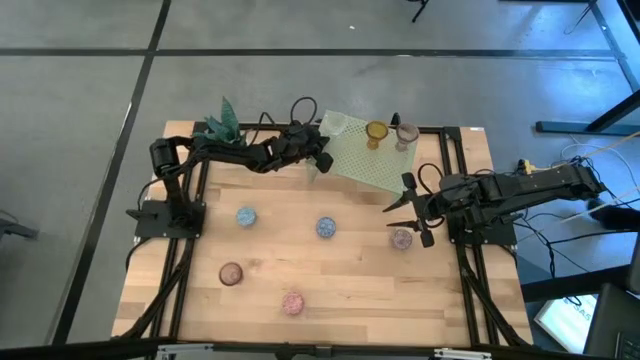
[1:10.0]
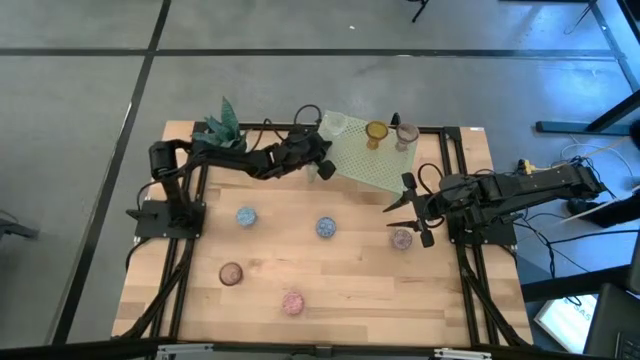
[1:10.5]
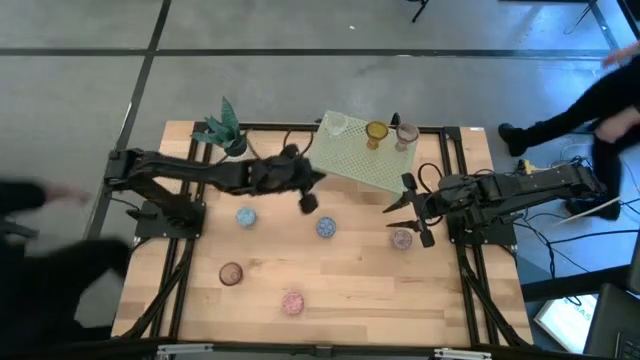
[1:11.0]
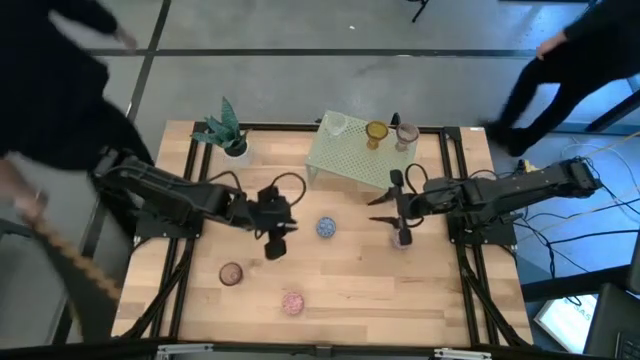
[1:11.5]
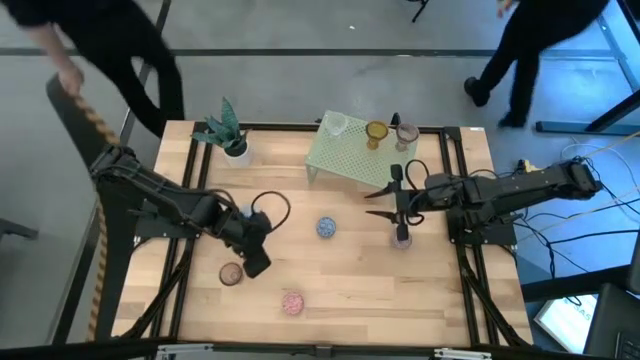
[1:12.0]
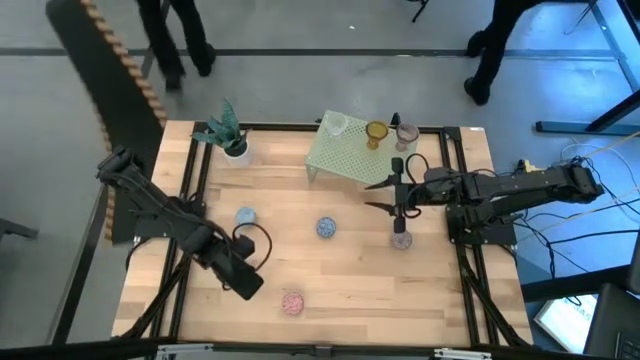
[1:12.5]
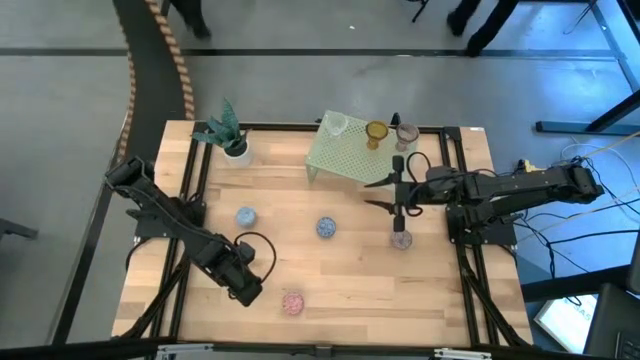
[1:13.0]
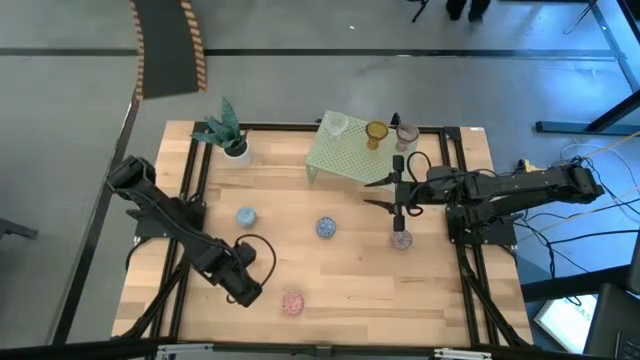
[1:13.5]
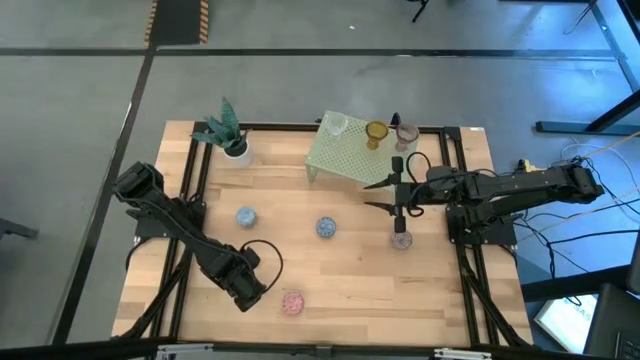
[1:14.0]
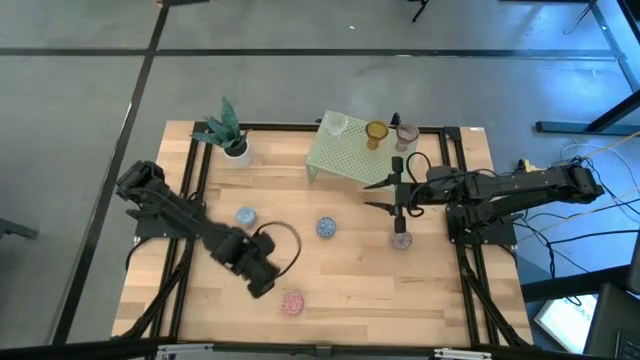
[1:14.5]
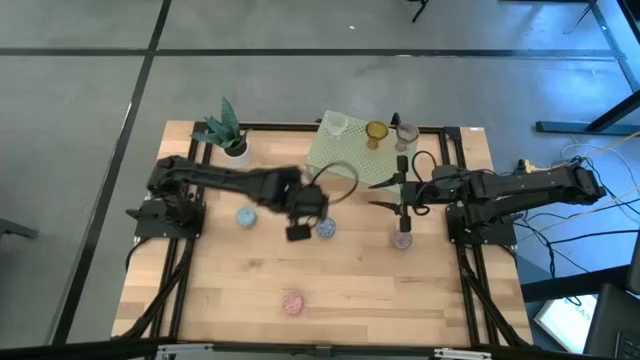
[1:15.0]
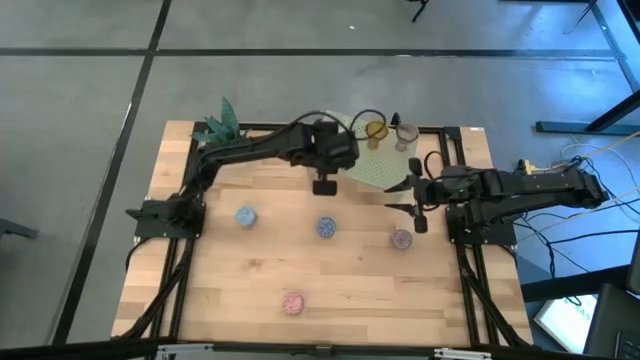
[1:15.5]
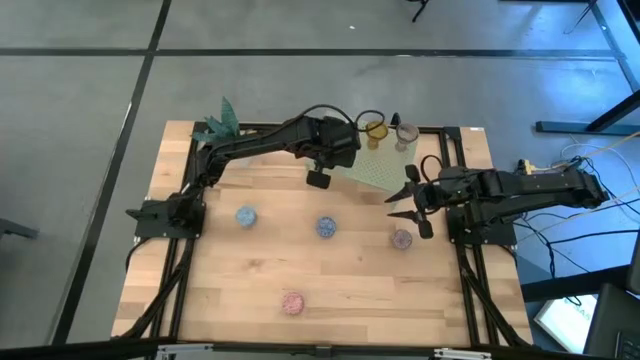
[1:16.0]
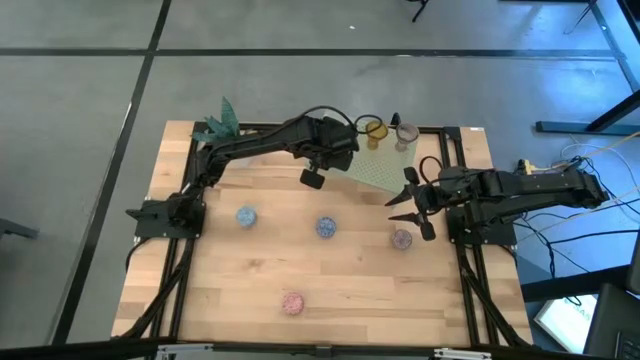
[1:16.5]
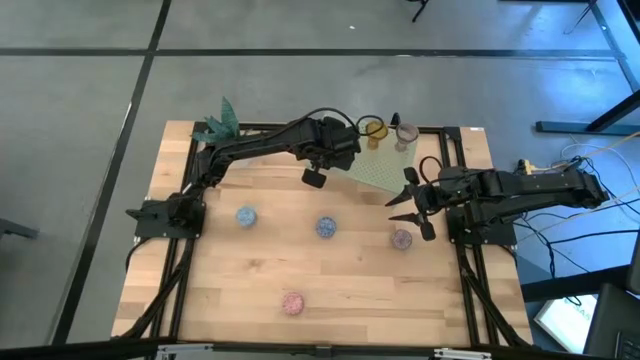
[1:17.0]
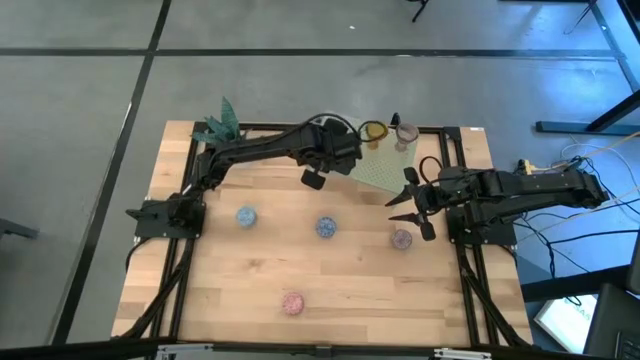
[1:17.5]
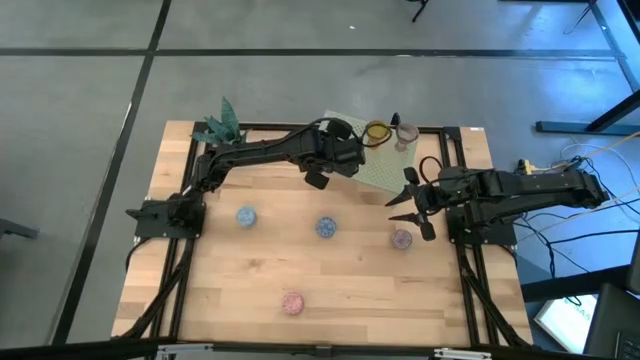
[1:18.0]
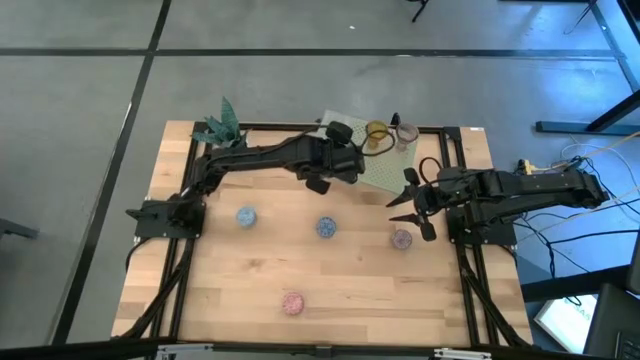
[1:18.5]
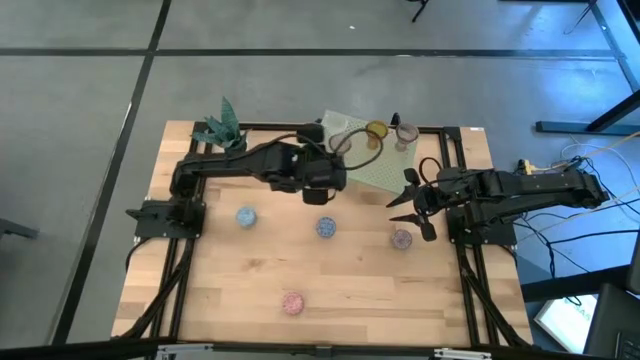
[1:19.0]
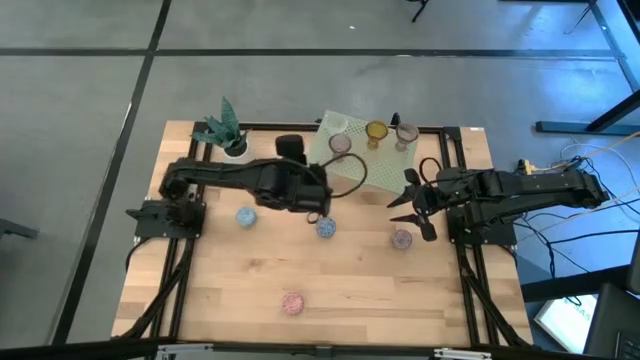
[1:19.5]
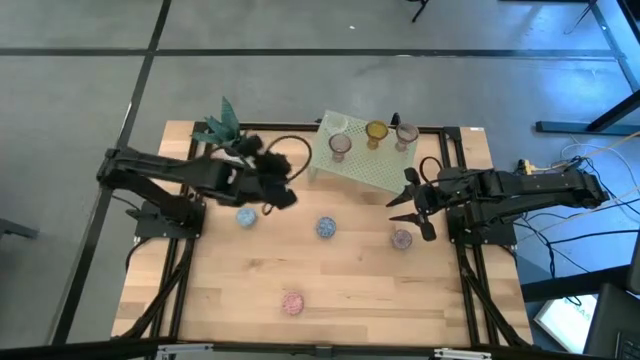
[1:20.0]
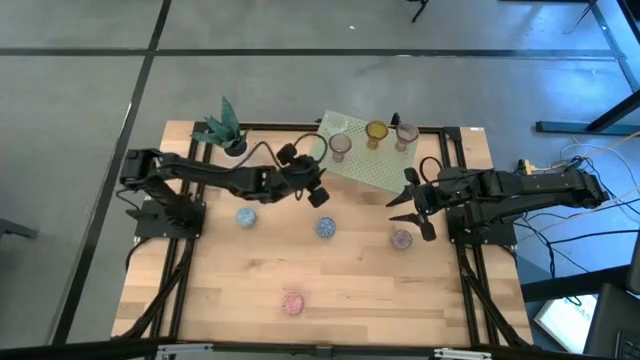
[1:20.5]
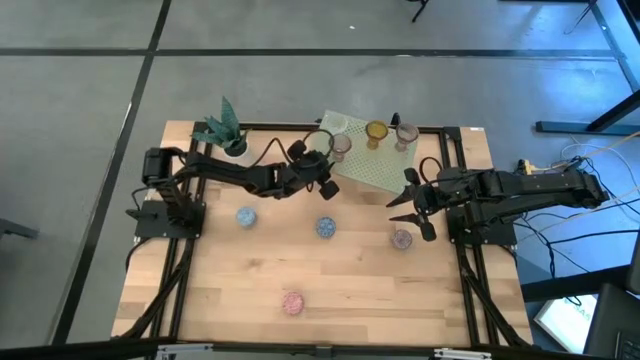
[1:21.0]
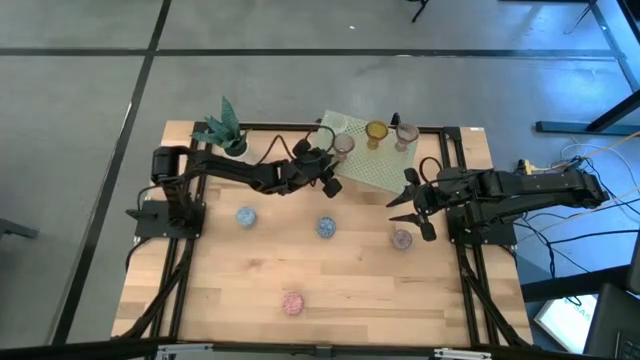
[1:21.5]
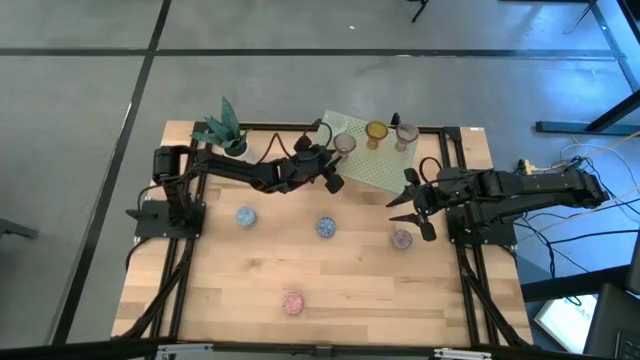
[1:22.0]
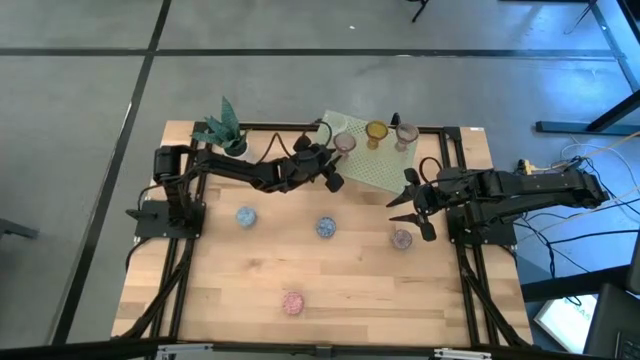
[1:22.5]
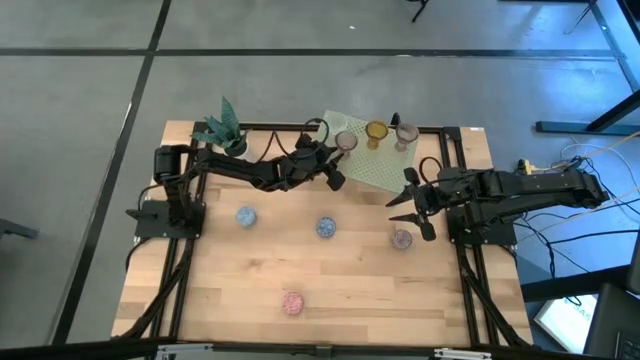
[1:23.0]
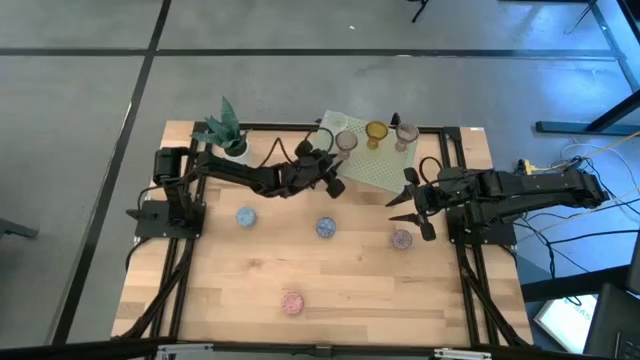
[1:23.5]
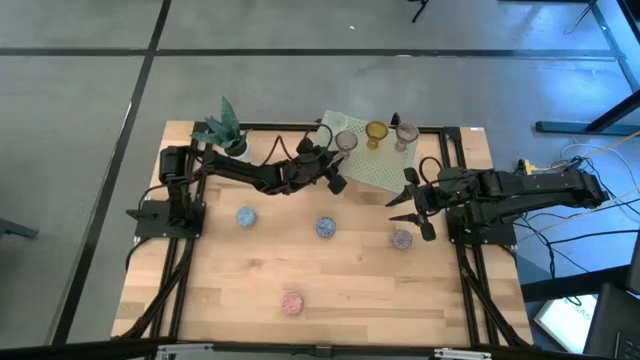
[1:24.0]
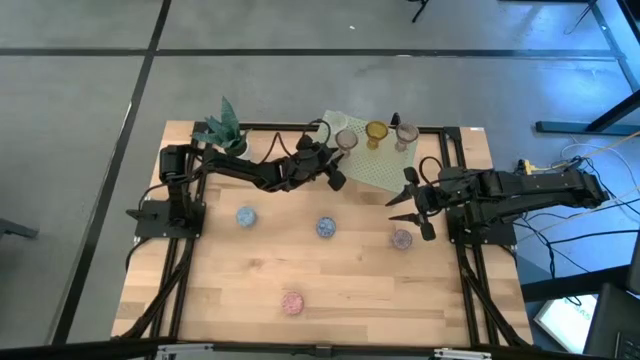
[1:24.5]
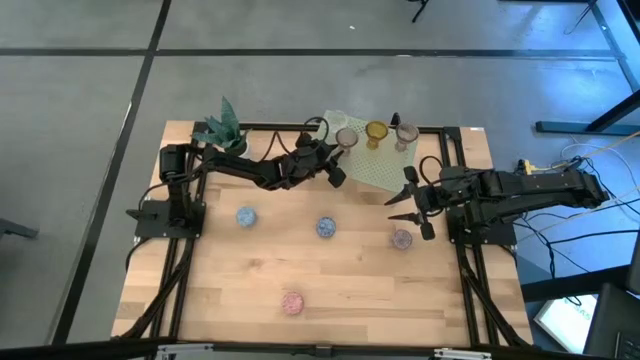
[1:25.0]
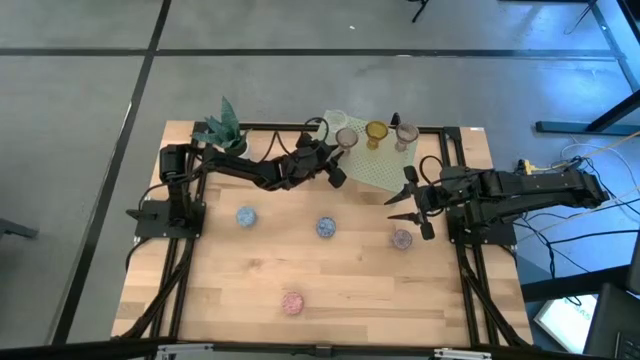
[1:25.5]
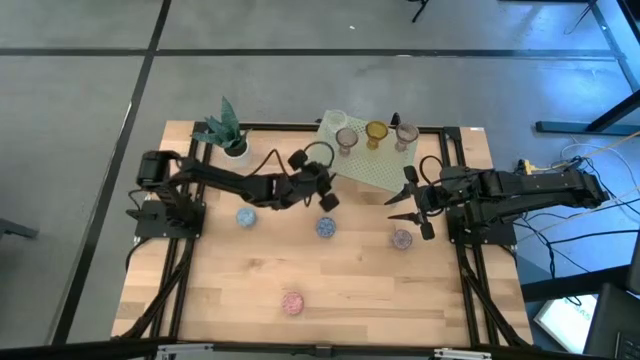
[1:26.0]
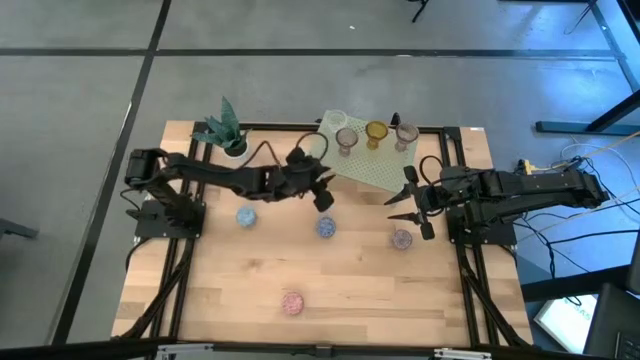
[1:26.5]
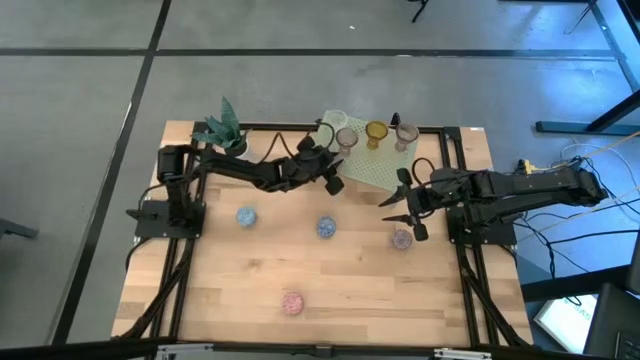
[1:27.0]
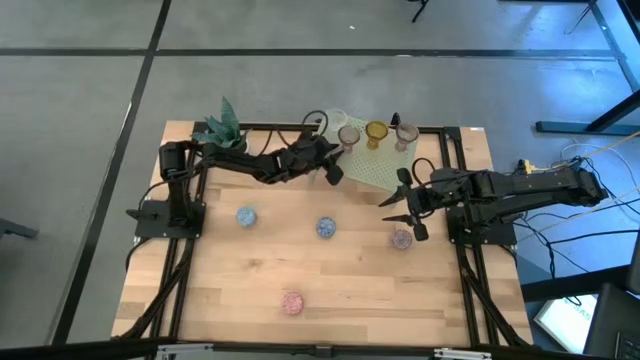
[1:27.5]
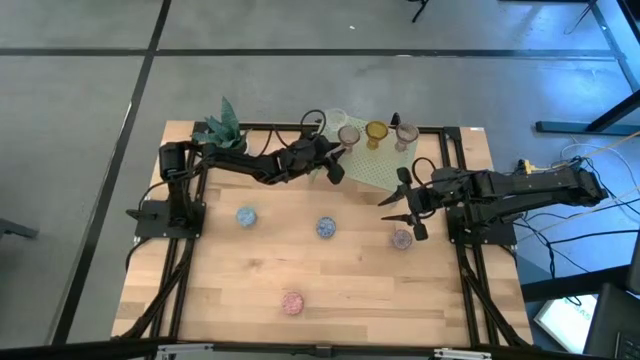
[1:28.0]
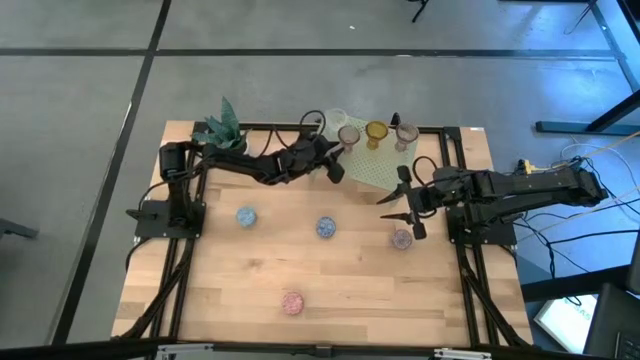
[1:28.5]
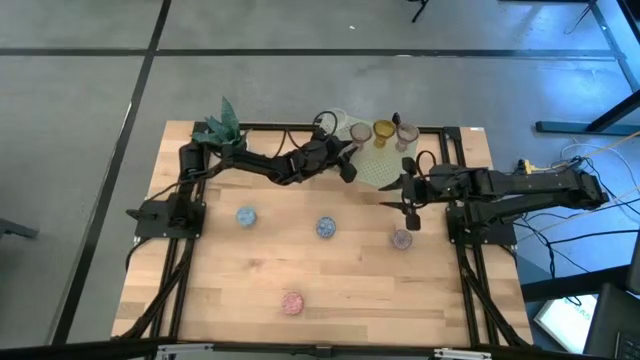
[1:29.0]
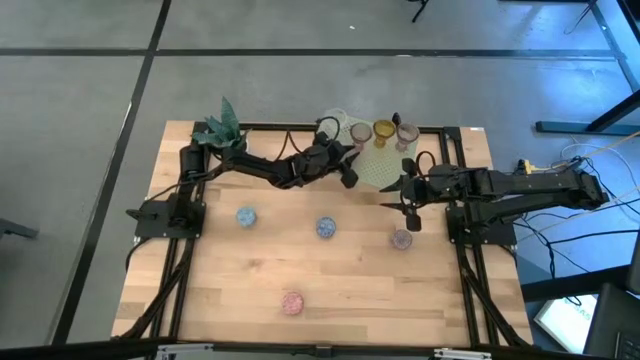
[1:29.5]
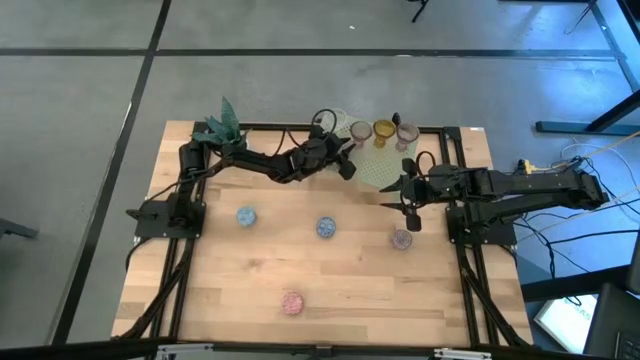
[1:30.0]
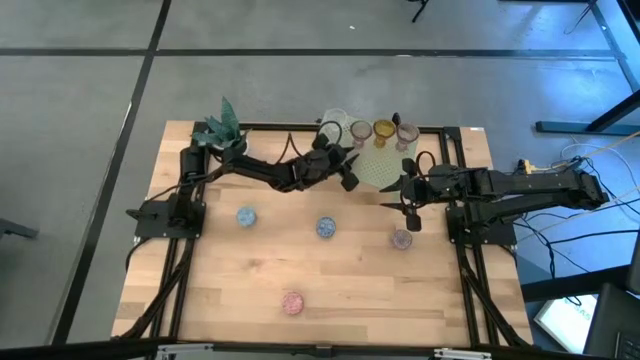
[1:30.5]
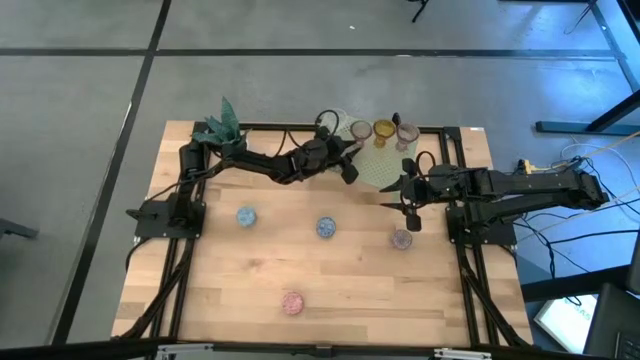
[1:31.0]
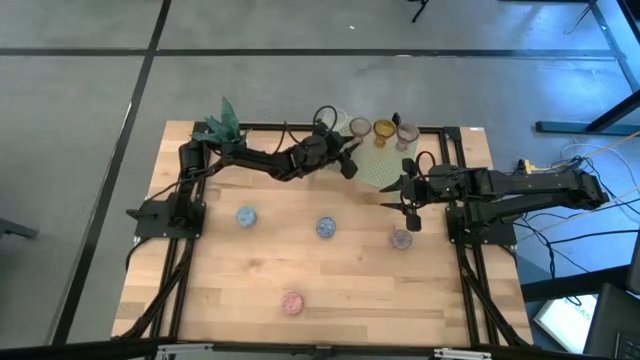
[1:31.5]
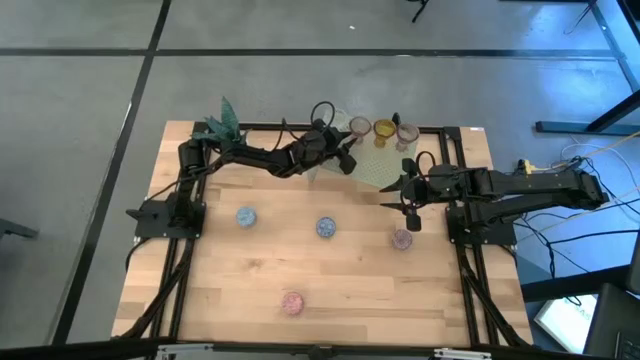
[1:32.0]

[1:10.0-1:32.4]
Task: Pick & Place candle stick holders
Put the pink candle holder on the shelf aligned with the brown candle holder
